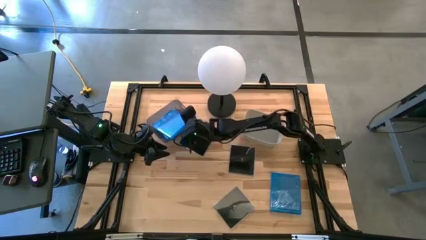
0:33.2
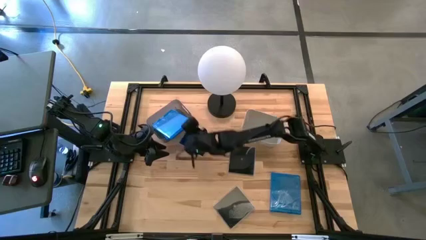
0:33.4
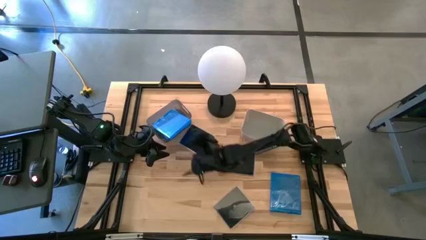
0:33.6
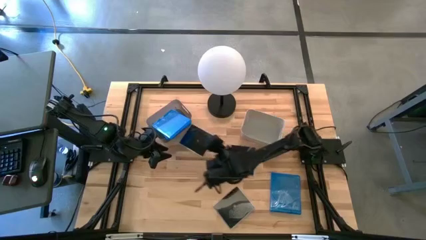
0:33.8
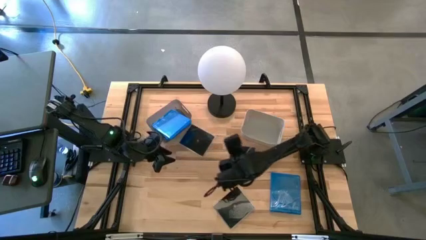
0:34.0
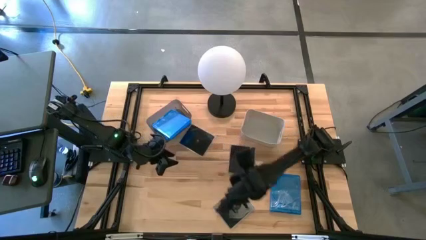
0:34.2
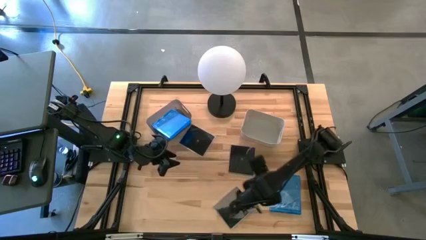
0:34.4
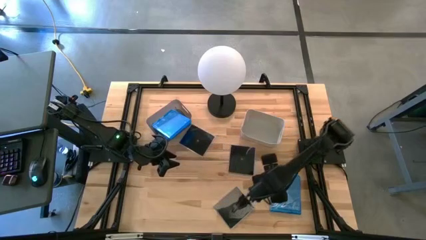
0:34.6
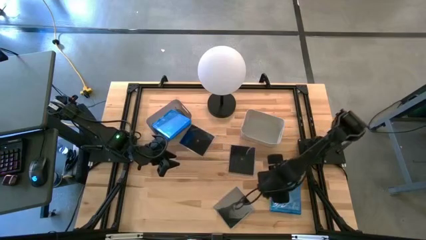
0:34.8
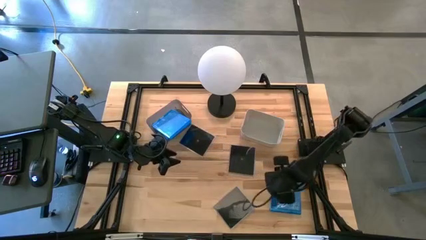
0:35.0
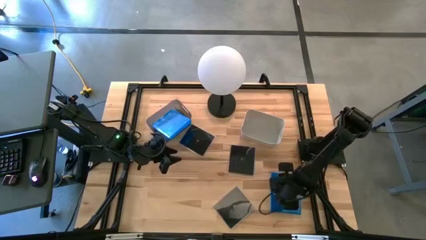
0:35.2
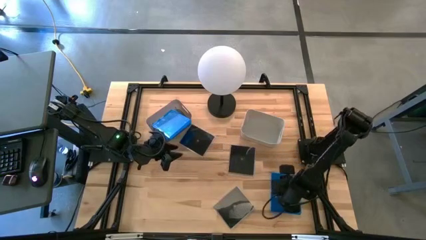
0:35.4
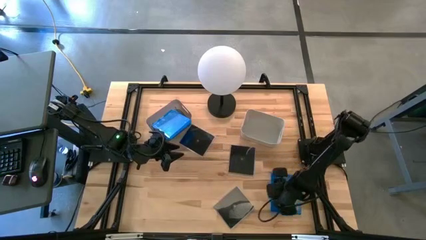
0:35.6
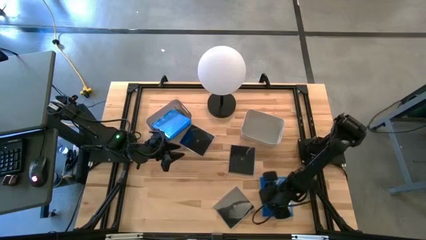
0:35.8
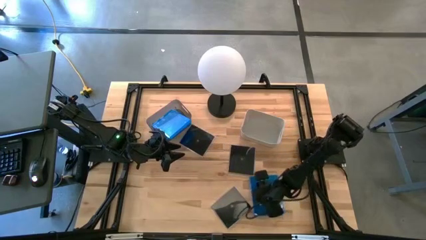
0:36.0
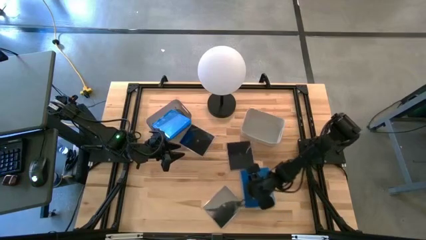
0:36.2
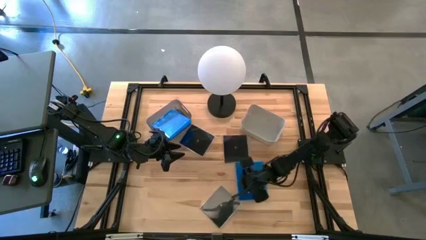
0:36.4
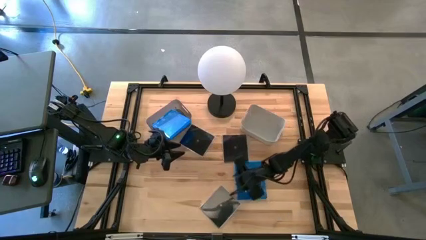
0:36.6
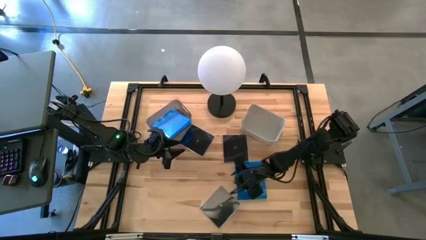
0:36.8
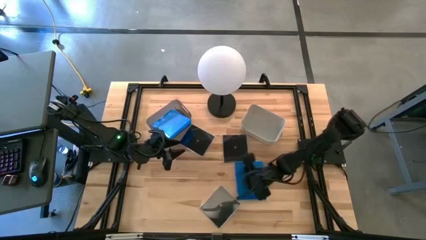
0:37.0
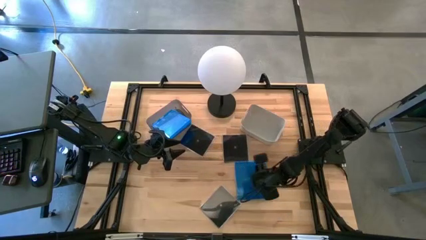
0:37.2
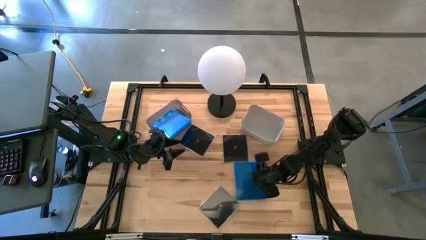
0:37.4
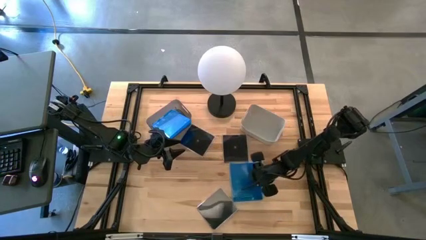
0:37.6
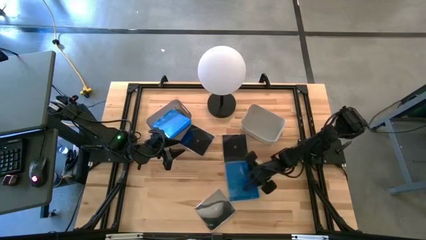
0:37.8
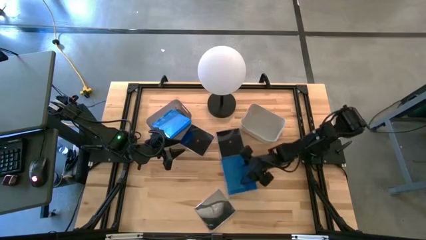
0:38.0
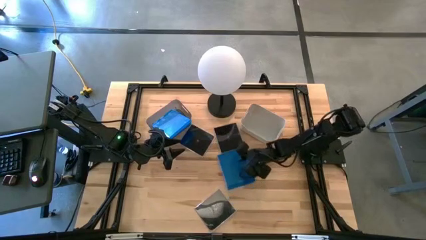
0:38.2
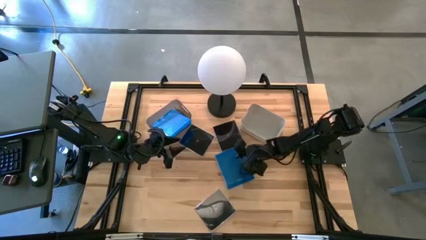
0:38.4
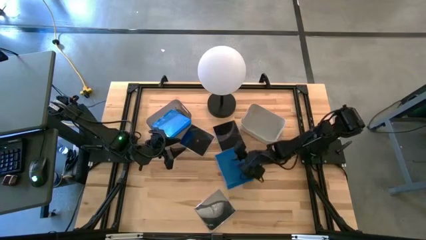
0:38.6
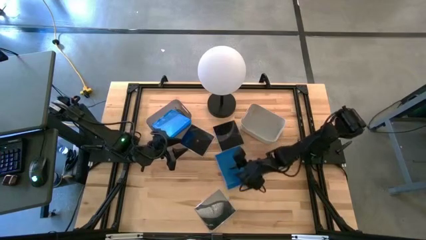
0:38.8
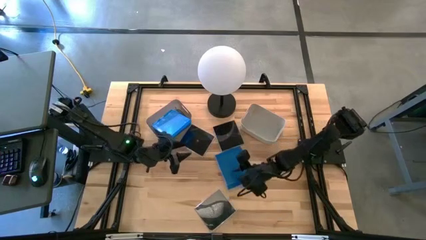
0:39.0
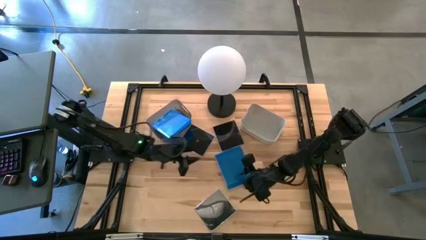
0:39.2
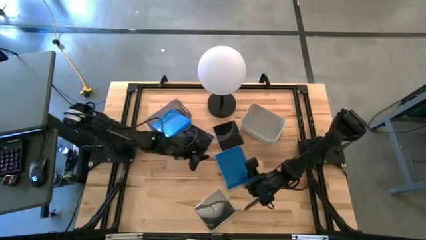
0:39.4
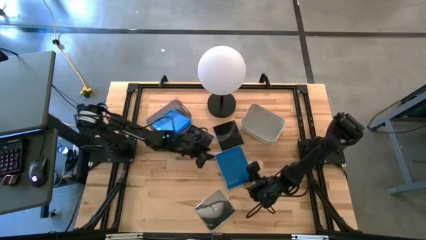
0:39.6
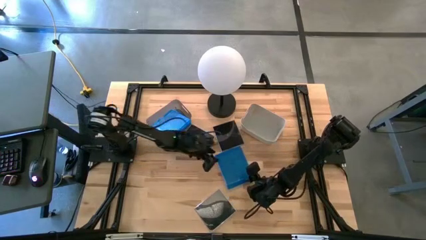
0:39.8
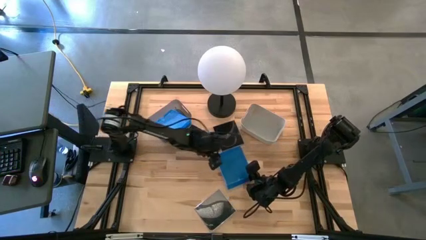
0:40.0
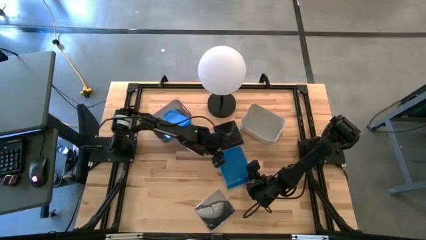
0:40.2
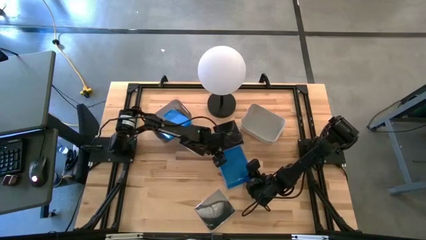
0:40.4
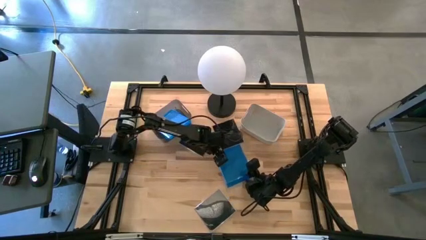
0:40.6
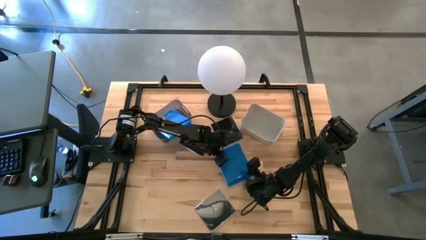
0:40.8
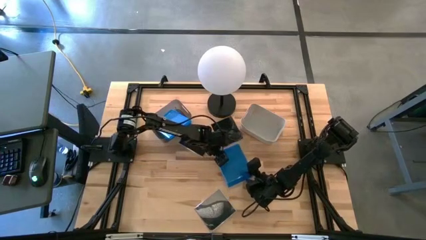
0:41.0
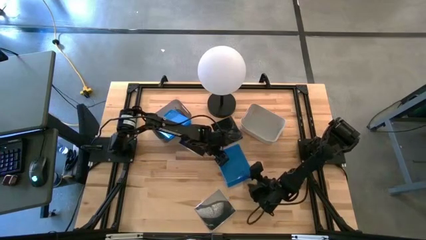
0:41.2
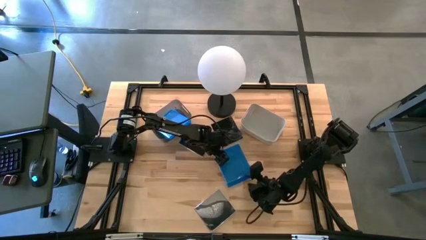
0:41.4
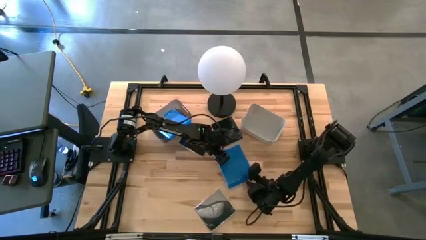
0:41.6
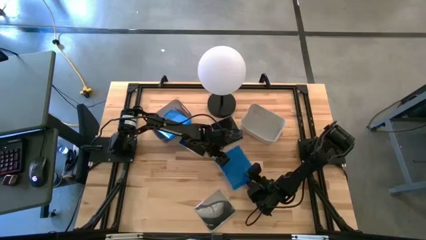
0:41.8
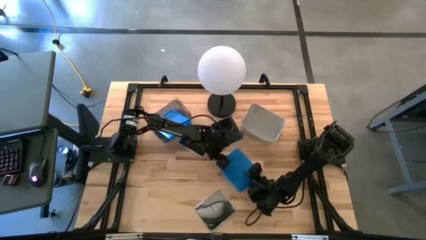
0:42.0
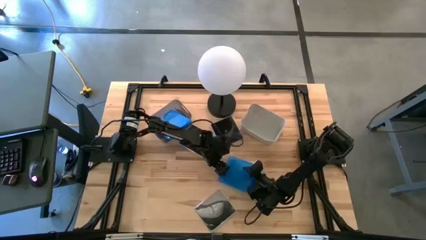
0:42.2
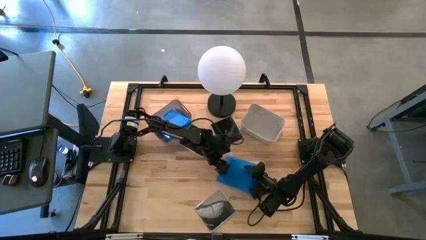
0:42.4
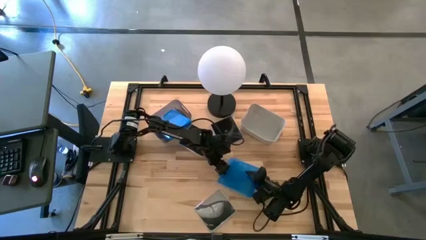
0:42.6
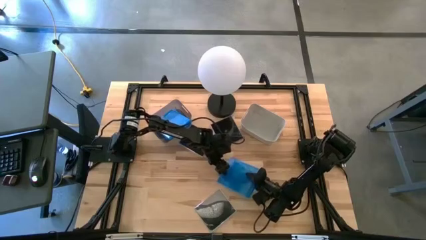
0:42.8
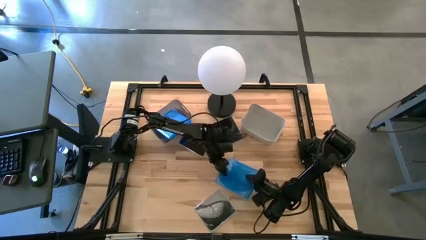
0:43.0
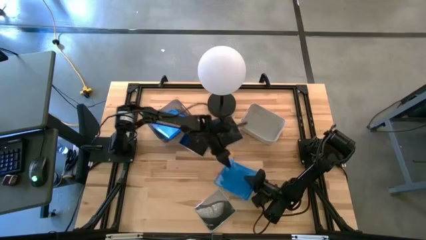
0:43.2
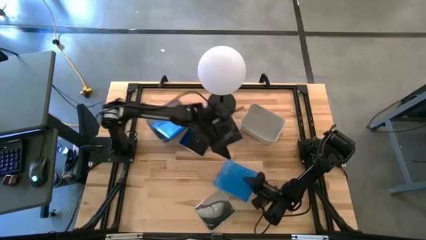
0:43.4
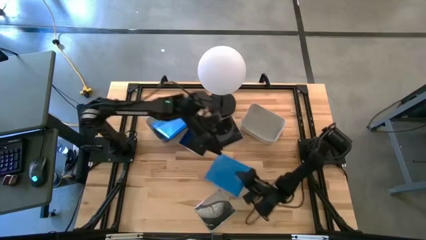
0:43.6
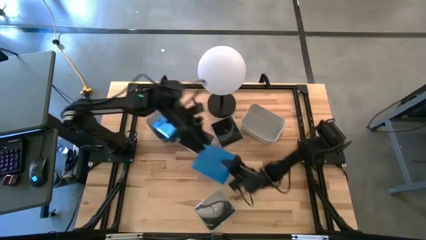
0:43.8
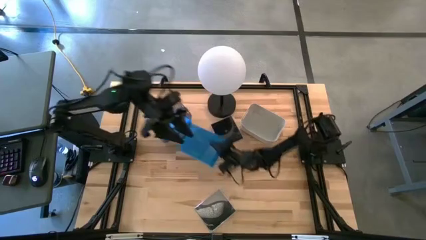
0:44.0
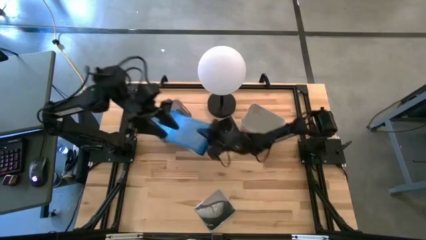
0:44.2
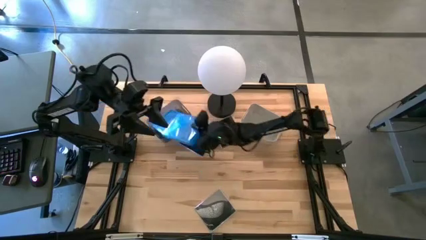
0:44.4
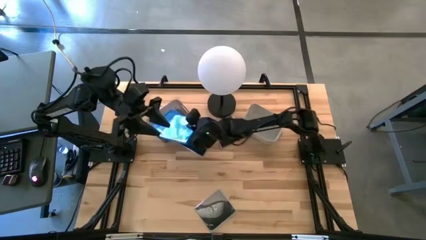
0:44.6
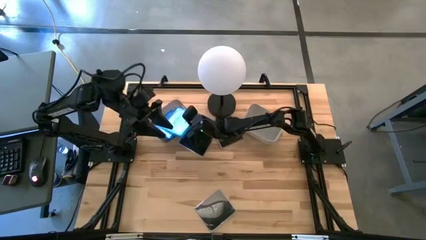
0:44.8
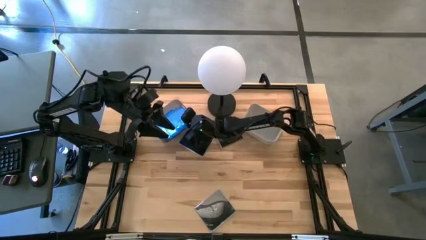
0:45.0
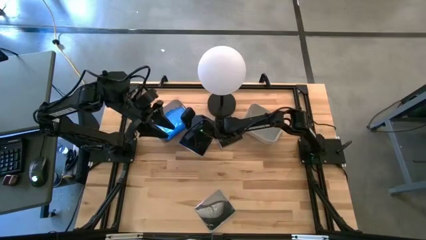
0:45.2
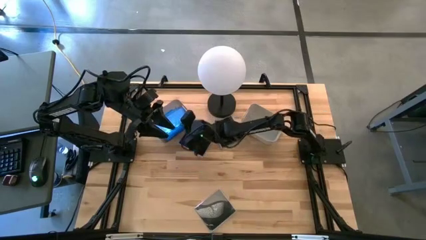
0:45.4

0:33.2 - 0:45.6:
Task: Pick & place jewel cases by type
Put the blue CD case into the black bin

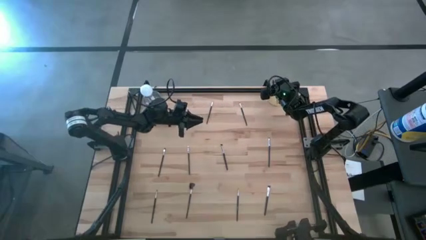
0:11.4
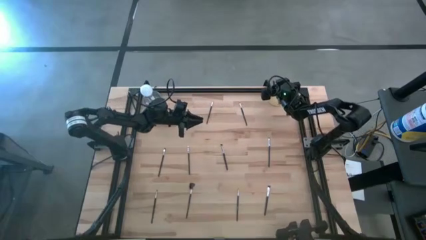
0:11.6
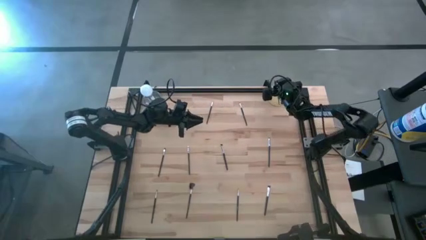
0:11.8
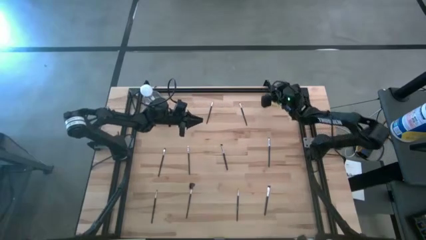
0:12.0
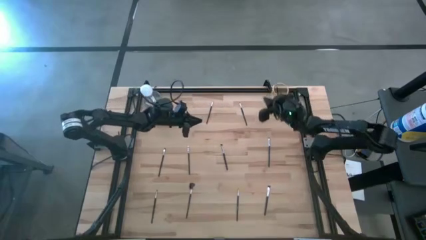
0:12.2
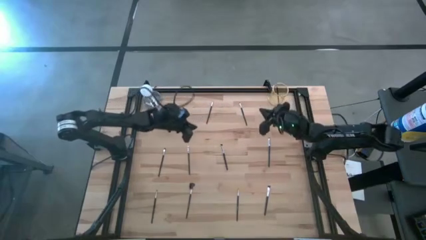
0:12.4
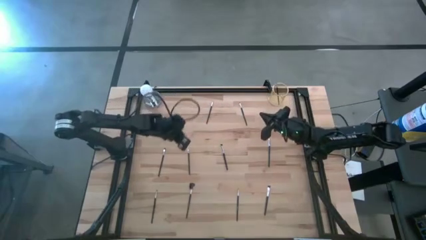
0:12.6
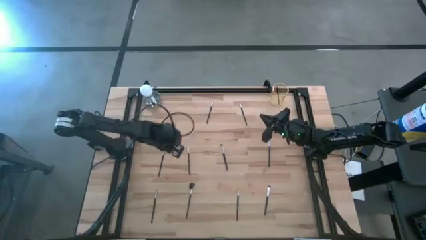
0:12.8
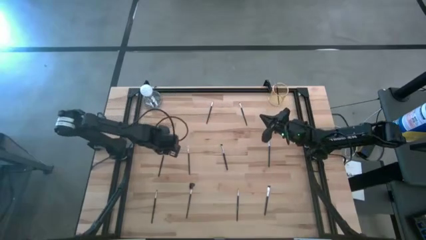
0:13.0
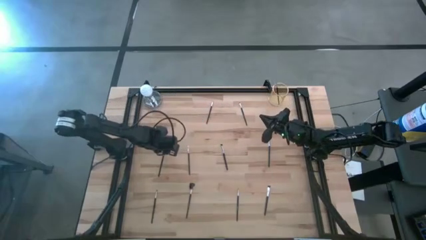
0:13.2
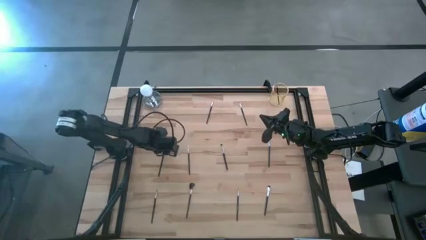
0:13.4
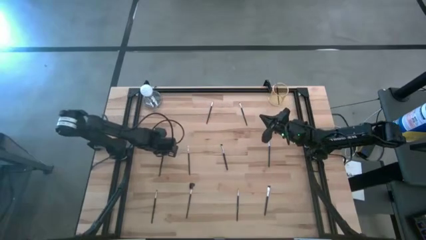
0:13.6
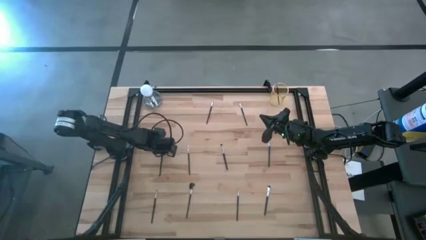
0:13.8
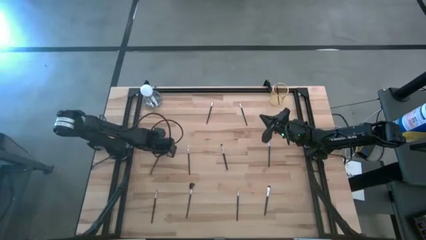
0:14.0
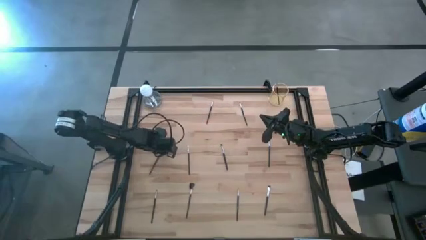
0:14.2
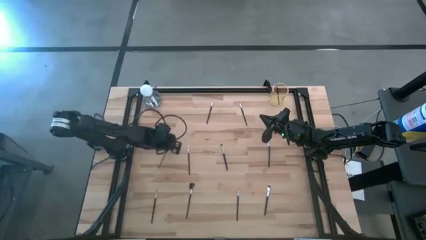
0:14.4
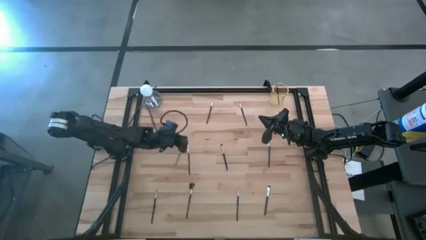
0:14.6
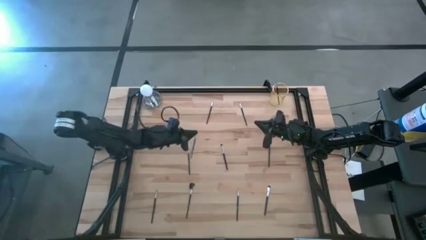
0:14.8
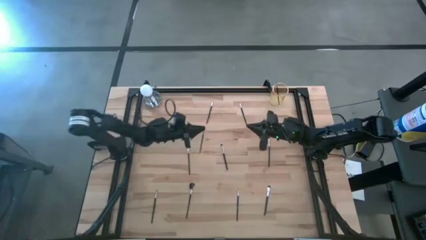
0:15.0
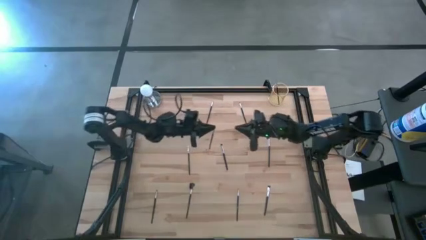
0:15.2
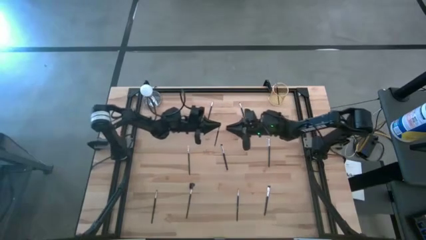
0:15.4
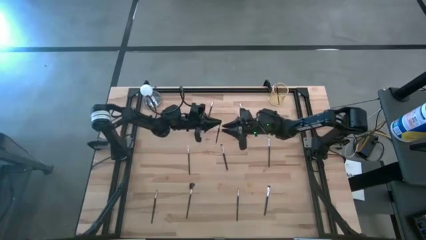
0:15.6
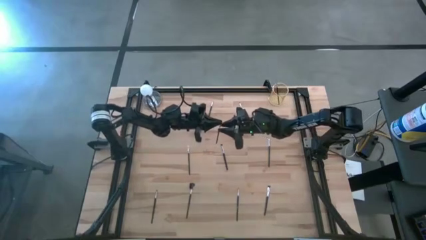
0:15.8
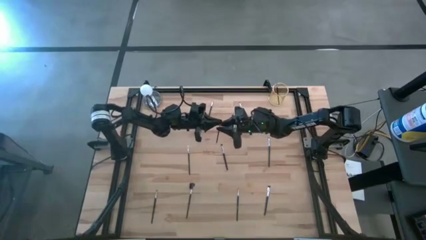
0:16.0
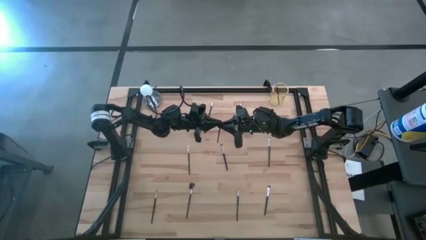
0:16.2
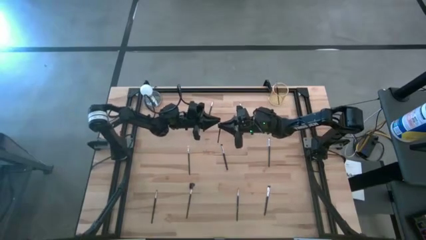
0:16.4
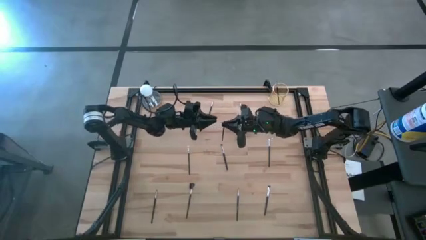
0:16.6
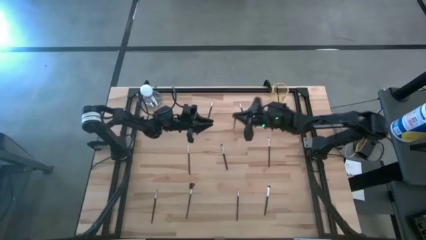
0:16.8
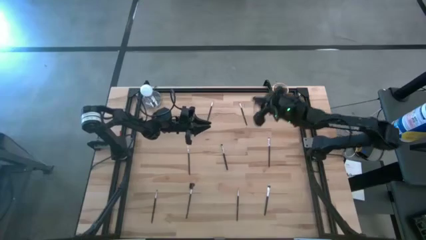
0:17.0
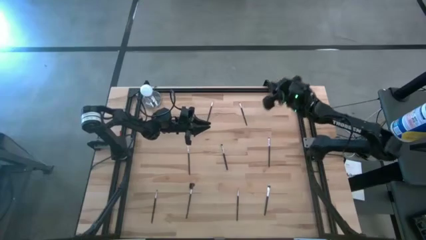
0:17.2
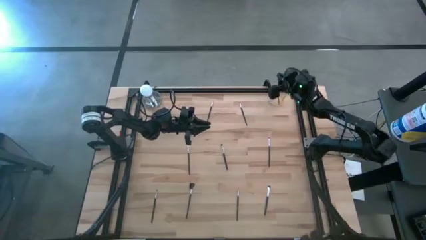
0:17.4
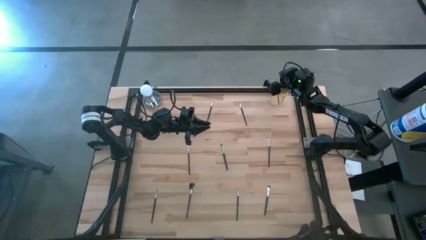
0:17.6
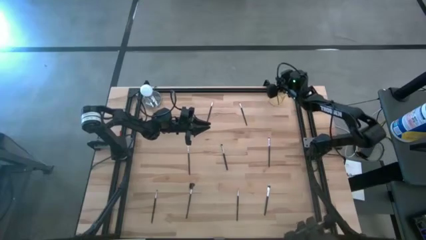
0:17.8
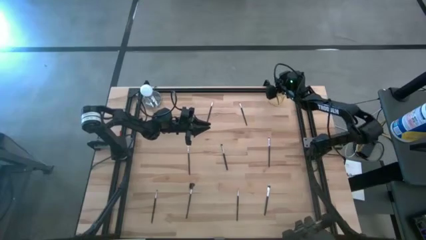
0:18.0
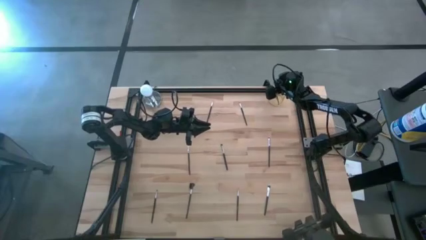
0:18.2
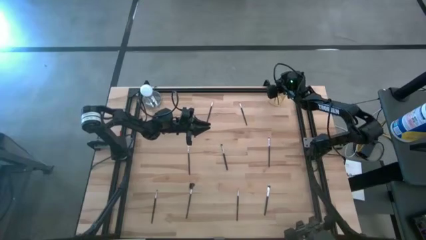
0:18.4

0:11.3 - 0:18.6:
Task: Sort items
Put the black eyeshadow brush into the gold holder
